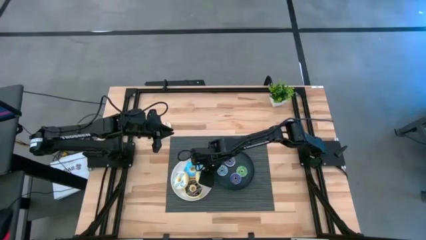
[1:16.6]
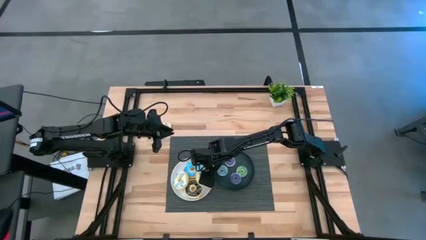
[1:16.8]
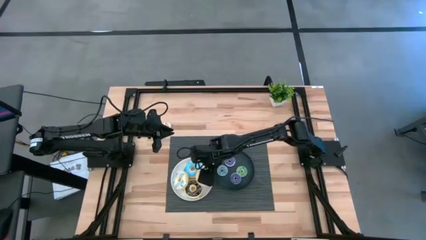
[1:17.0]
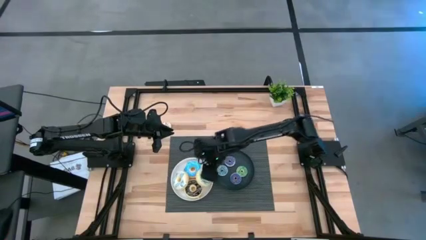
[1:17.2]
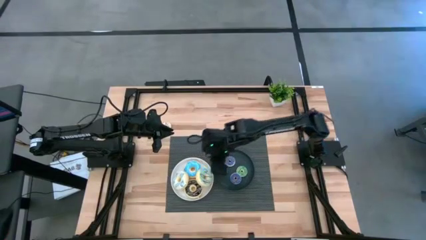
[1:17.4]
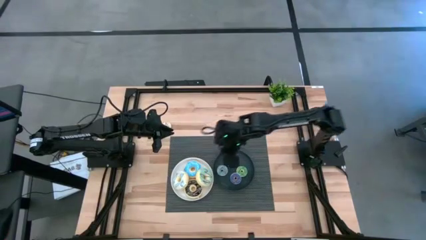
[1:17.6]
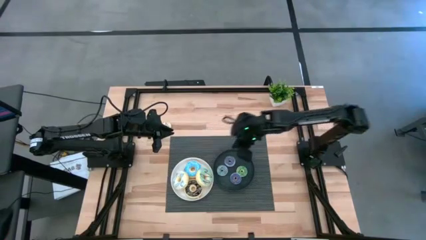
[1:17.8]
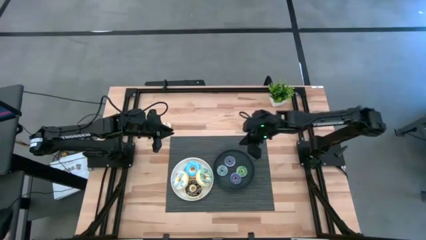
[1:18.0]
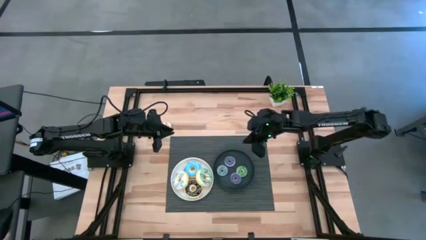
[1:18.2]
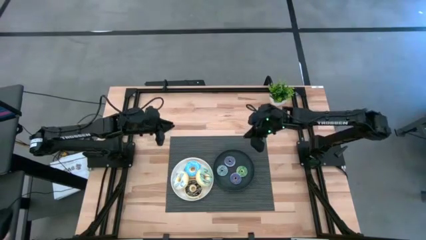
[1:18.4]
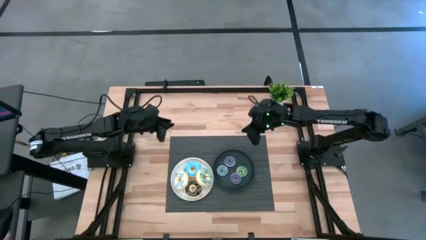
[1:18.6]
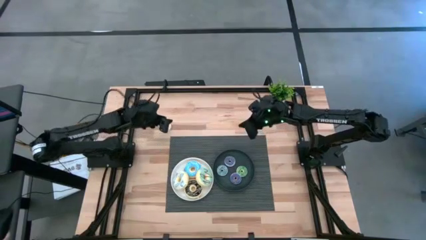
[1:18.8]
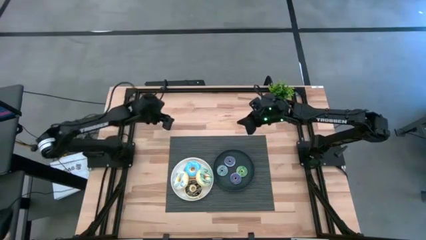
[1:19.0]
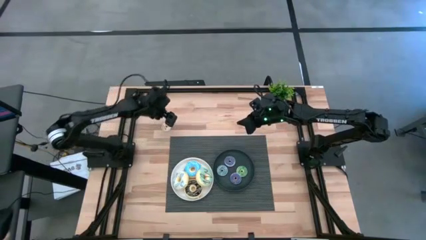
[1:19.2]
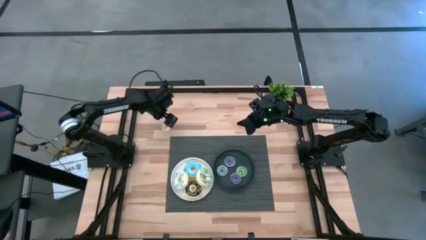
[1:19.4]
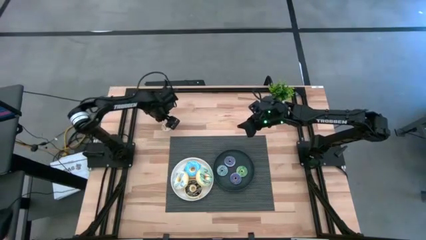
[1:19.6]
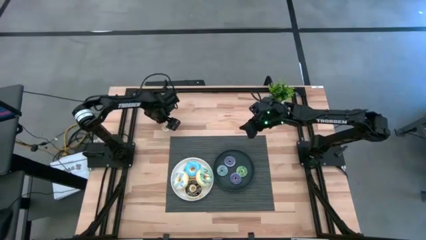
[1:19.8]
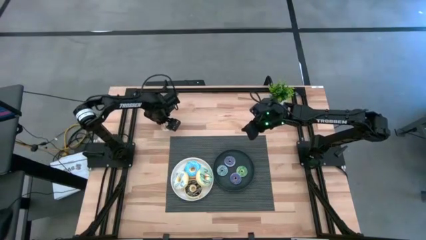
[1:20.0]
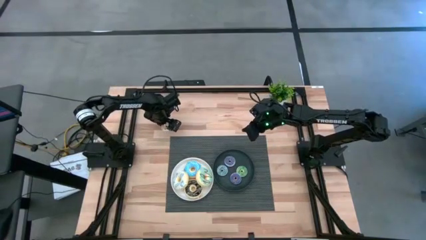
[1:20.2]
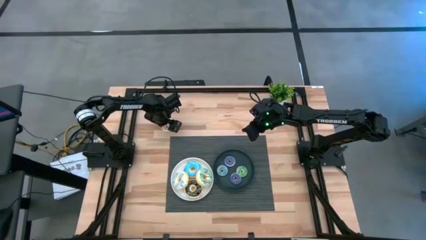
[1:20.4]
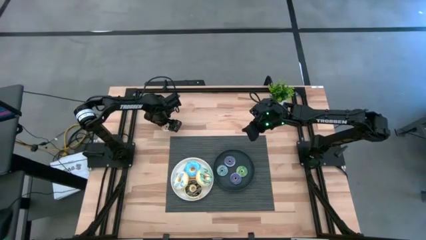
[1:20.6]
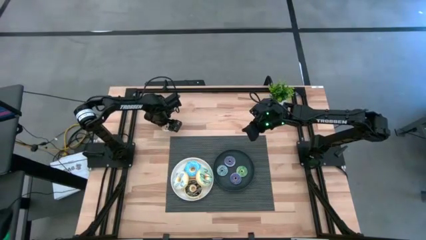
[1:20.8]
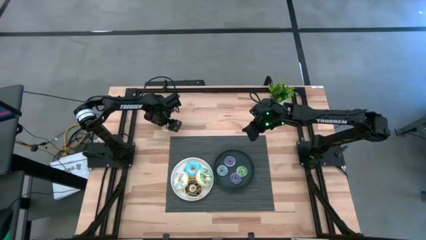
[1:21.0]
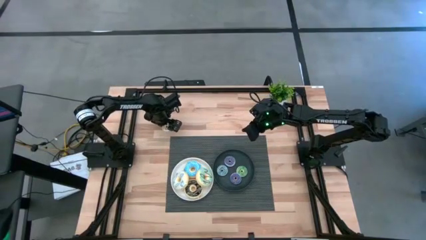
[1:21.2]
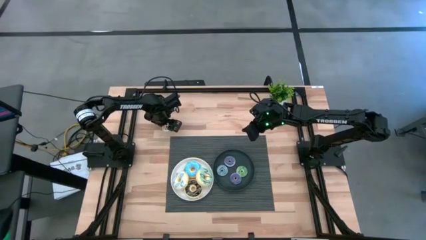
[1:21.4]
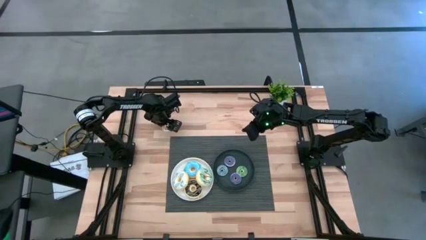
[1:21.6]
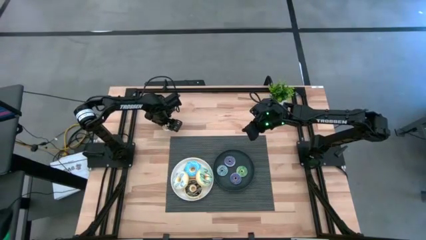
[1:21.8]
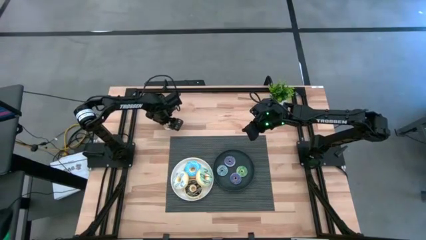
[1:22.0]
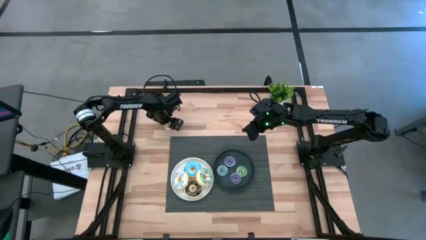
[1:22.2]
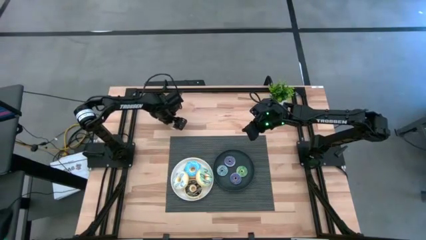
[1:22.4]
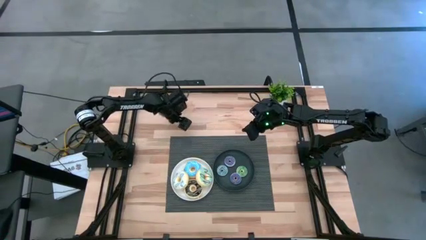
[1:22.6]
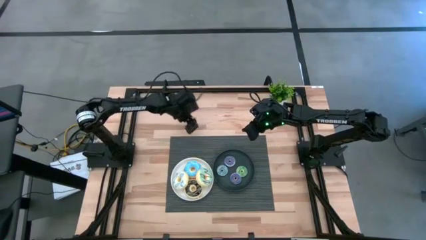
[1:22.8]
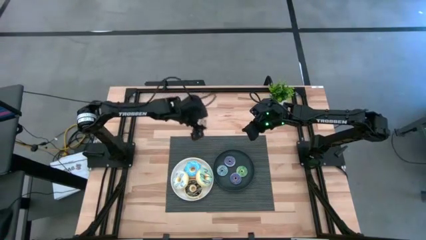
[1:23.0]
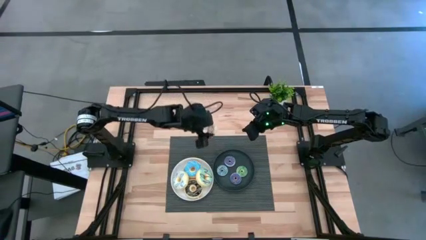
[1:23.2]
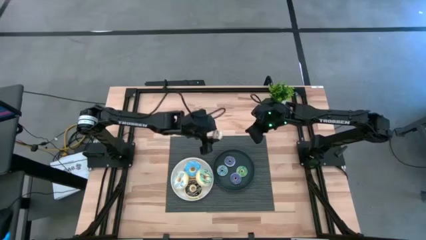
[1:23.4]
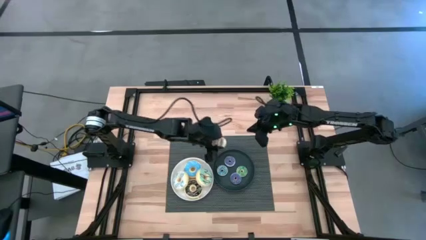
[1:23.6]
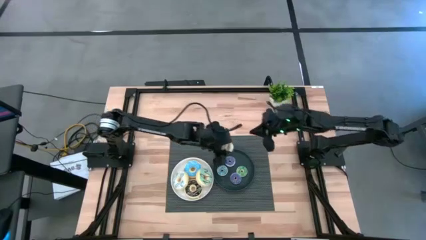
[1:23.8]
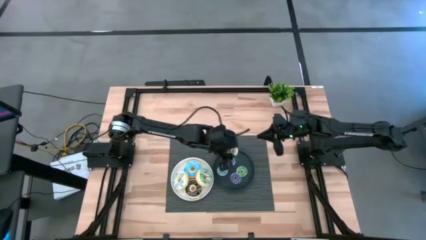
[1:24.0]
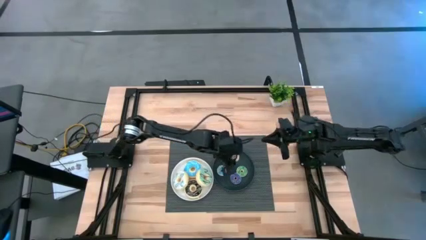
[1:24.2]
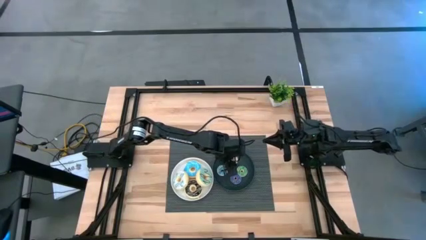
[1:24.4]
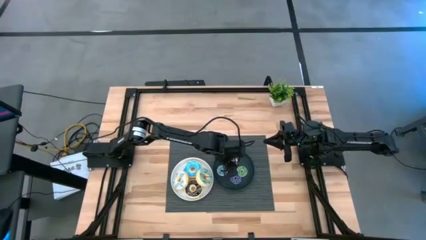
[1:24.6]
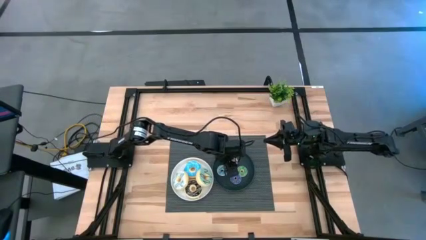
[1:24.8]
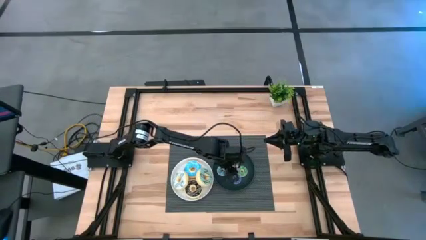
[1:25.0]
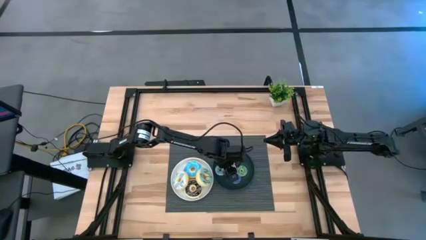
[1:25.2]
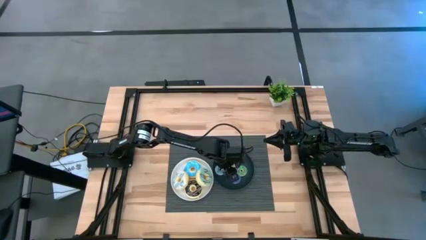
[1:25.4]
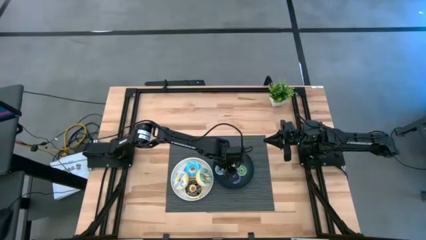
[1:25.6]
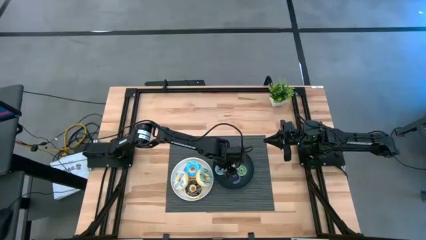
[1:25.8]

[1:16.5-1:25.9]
Task: Pick & Place donuts
Put the small white donut on the black plate

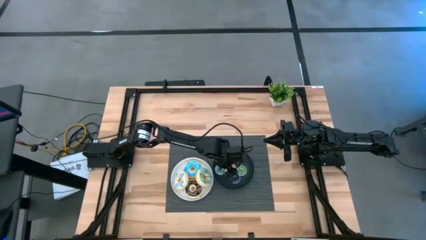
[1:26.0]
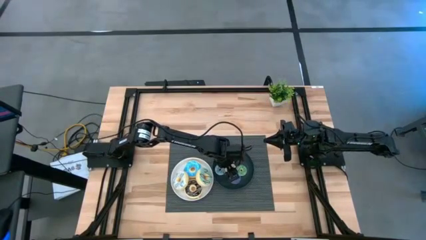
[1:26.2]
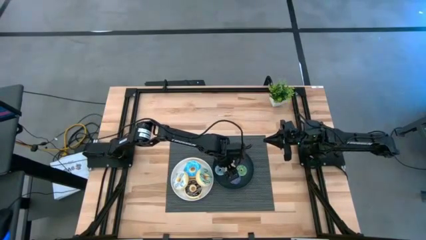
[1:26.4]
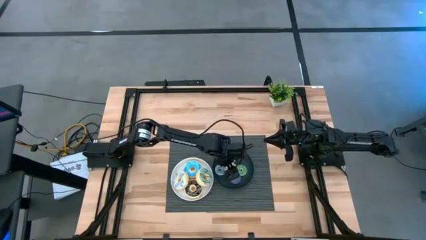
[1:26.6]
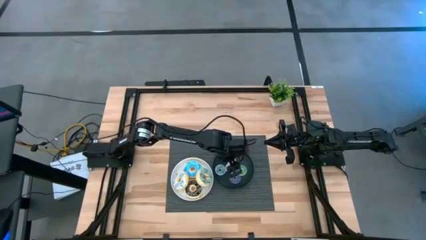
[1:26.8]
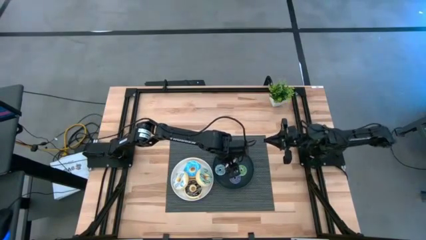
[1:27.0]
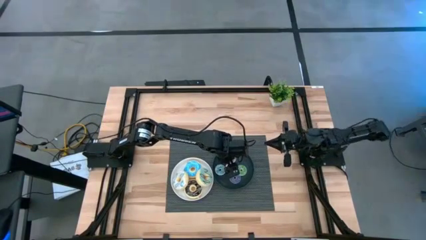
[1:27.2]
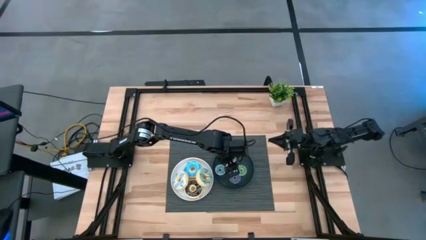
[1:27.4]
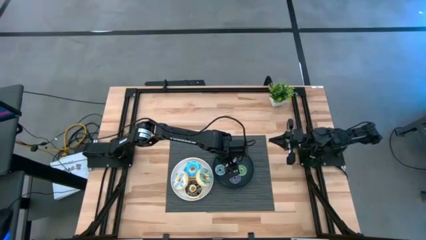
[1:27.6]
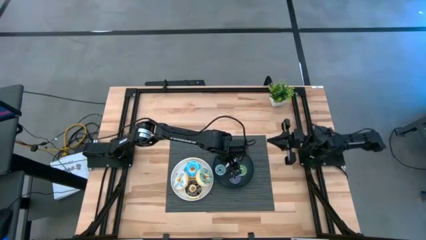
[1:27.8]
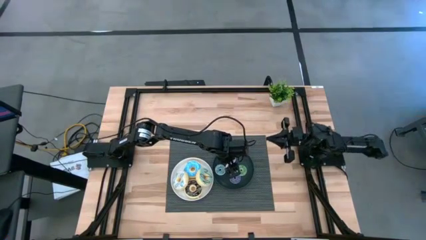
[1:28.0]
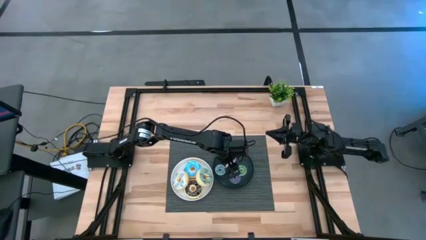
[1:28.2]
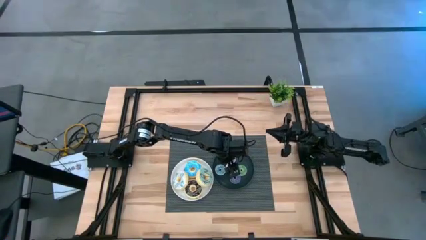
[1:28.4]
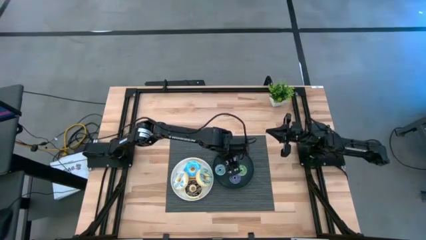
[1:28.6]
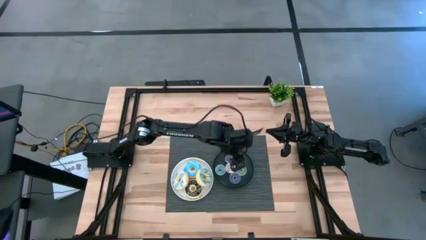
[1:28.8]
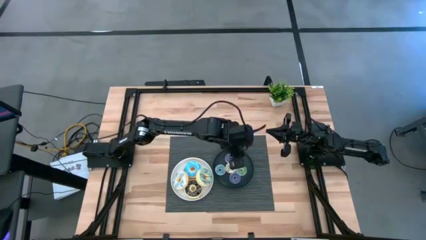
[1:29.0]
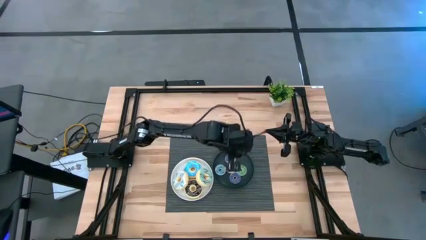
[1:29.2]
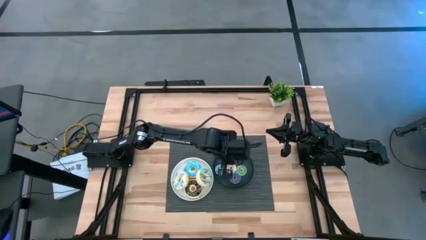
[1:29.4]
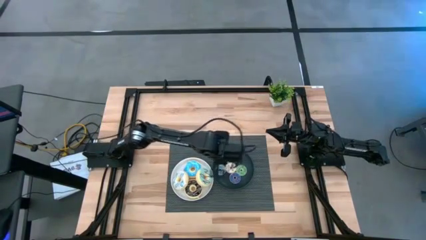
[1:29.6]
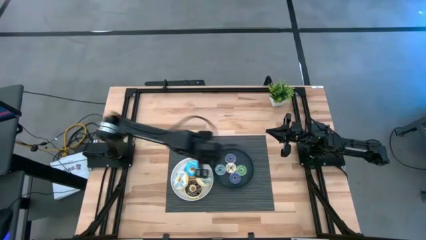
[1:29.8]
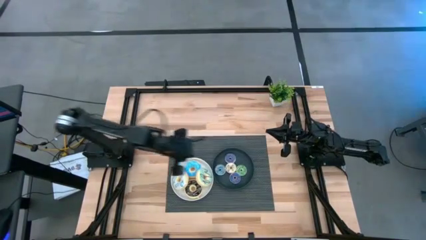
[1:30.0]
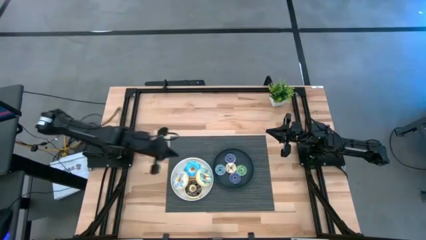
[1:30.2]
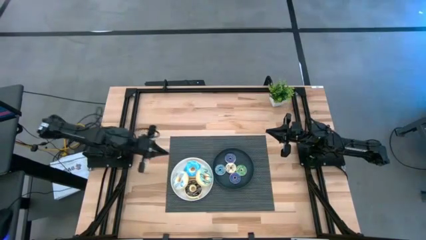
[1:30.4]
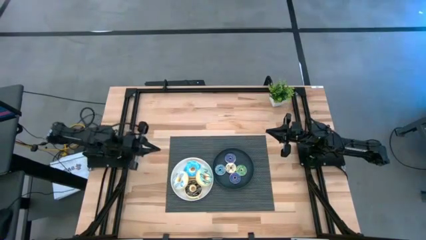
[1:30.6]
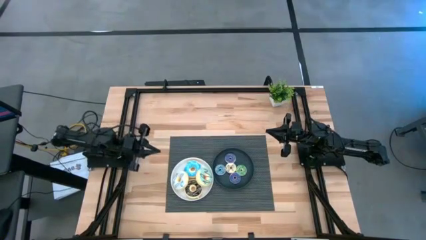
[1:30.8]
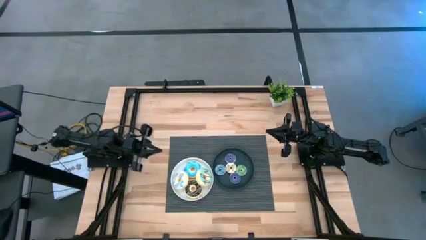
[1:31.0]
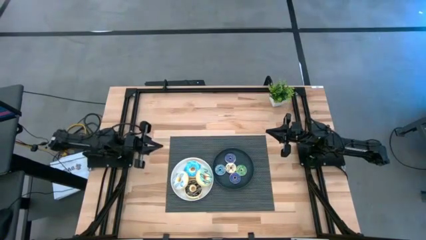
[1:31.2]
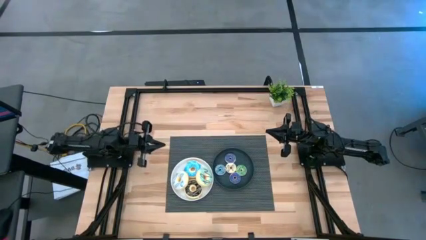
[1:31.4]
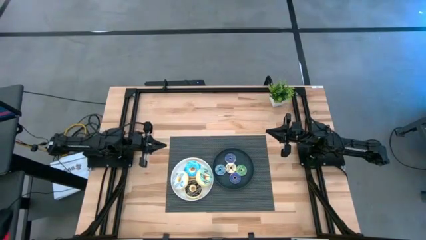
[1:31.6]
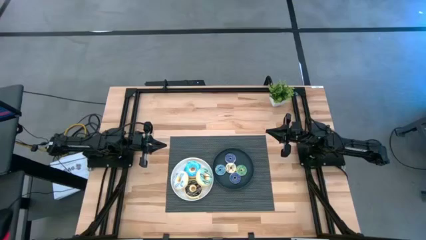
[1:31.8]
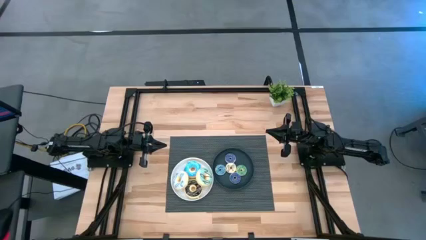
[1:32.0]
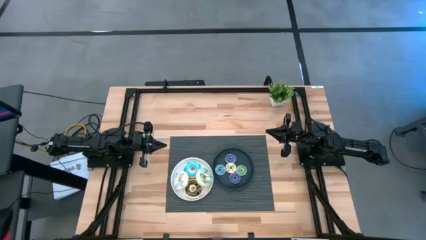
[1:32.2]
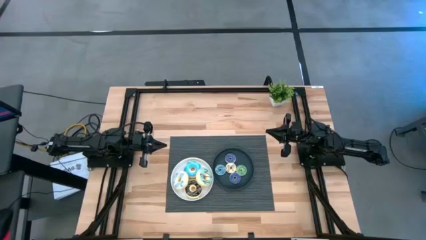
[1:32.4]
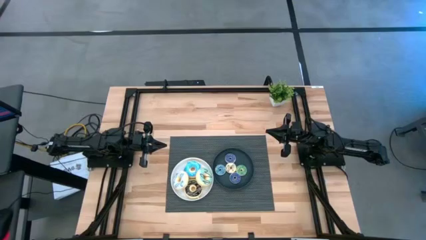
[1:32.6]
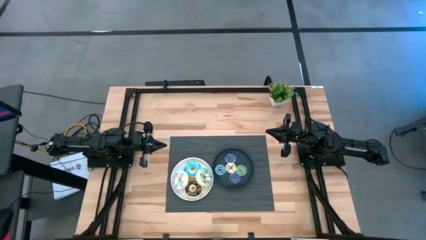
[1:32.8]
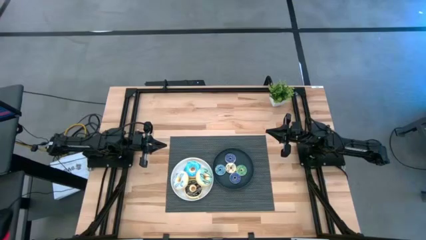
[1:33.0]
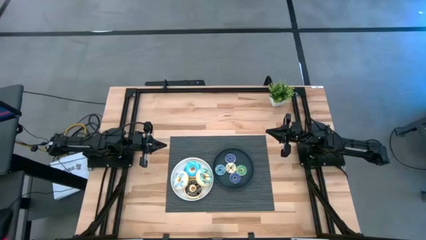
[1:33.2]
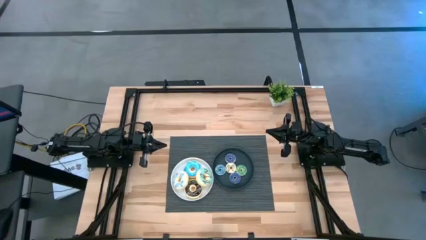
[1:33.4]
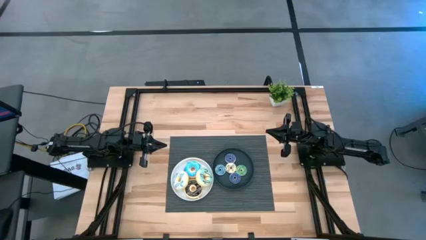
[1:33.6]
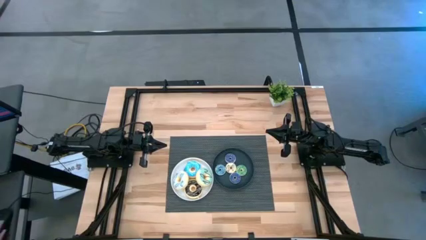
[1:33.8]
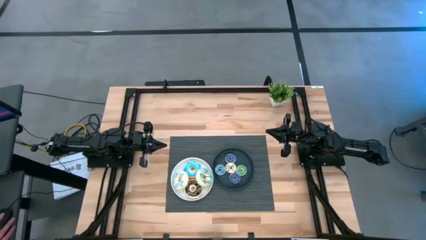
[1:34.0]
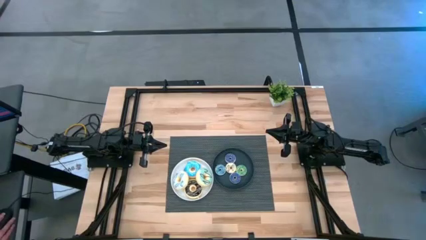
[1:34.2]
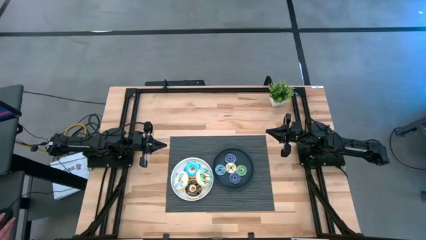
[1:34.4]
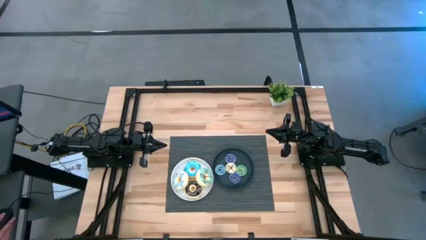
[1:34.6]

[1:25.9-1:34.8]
Return to Home Position
